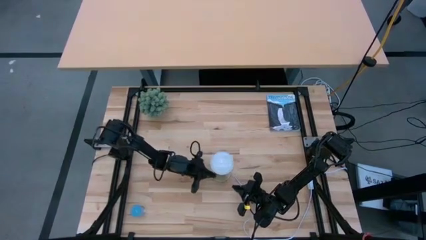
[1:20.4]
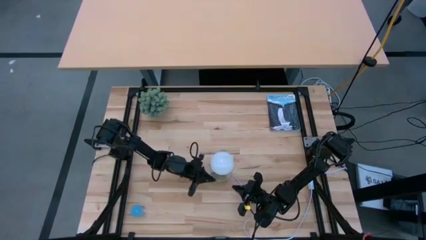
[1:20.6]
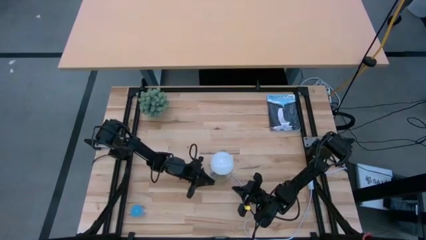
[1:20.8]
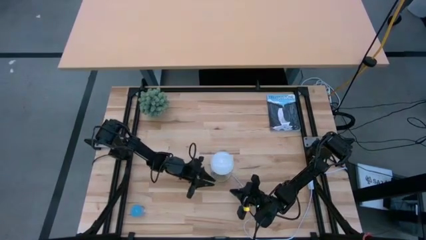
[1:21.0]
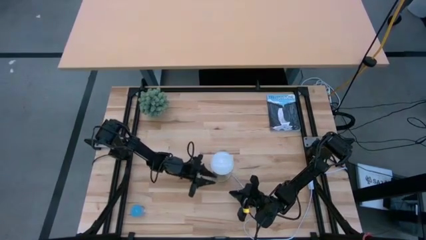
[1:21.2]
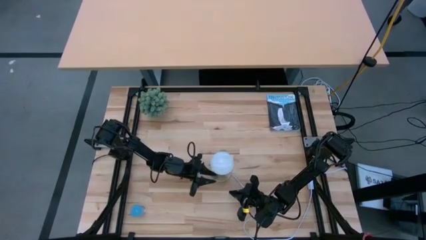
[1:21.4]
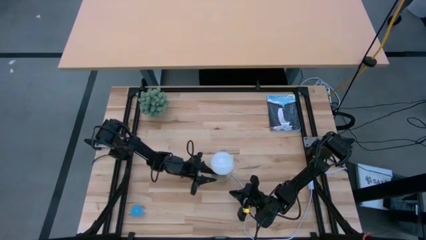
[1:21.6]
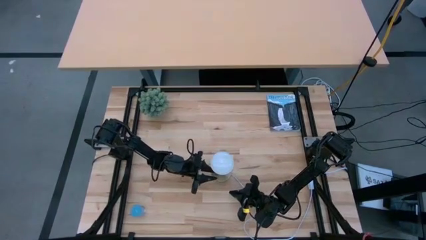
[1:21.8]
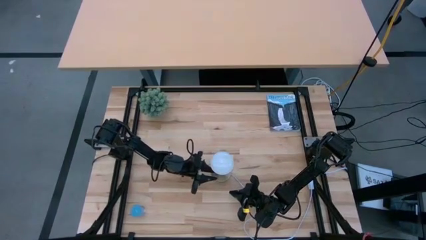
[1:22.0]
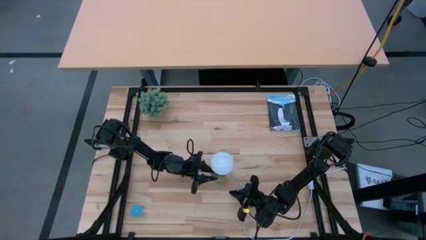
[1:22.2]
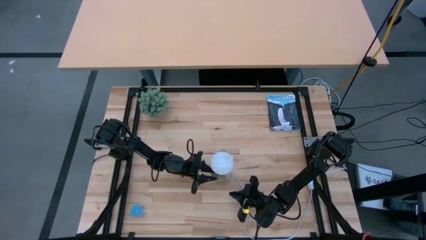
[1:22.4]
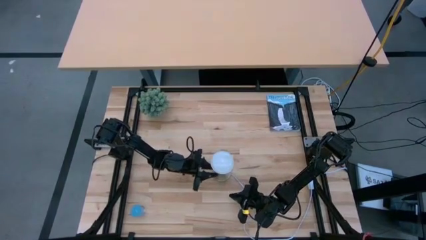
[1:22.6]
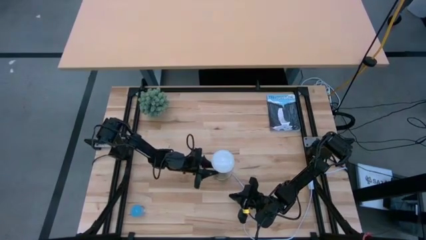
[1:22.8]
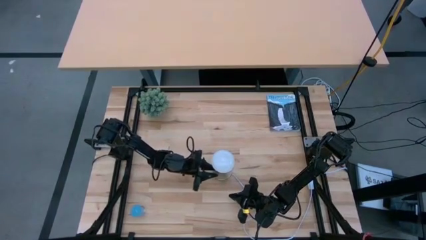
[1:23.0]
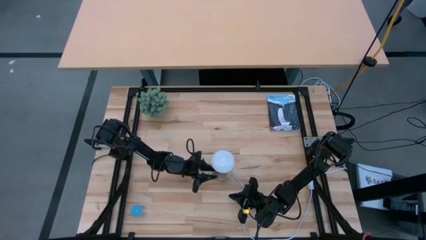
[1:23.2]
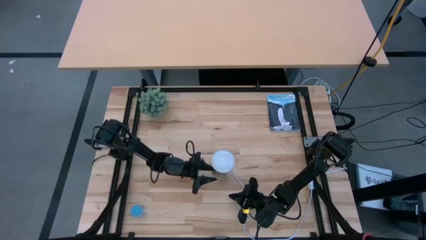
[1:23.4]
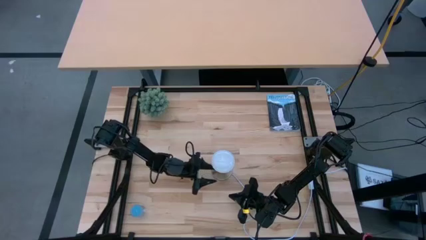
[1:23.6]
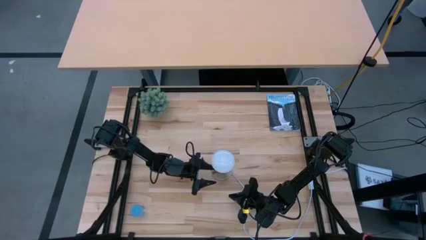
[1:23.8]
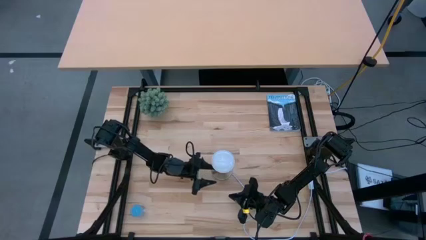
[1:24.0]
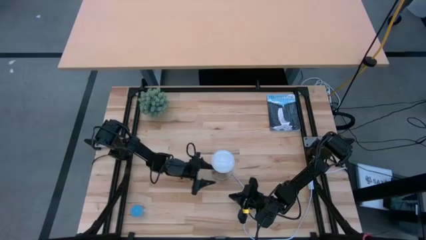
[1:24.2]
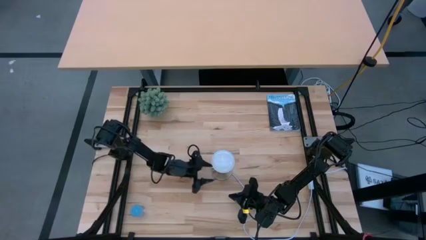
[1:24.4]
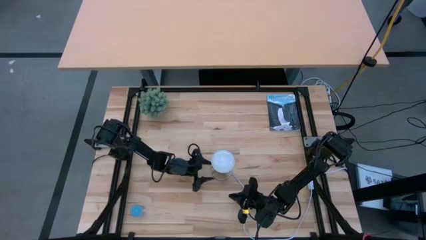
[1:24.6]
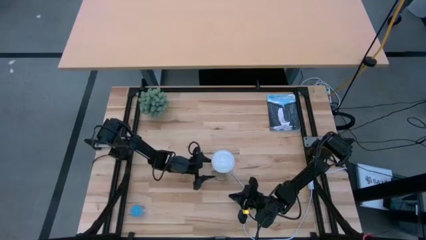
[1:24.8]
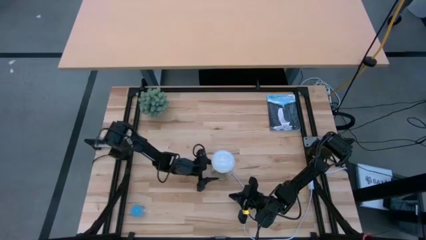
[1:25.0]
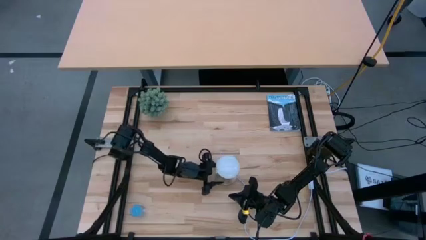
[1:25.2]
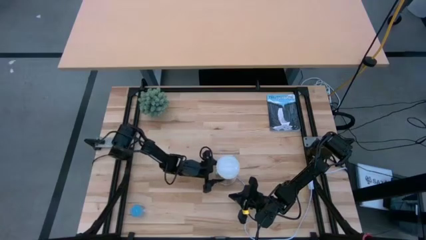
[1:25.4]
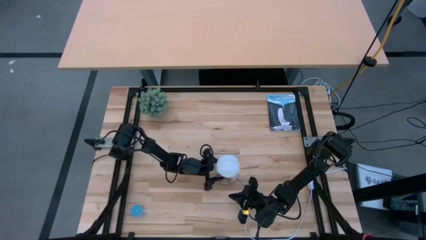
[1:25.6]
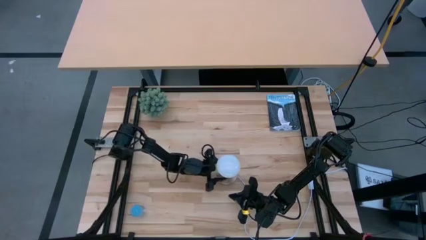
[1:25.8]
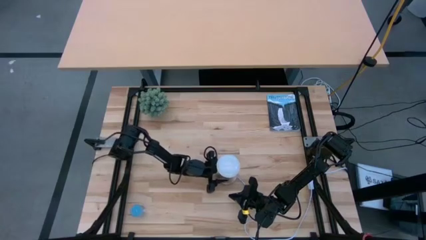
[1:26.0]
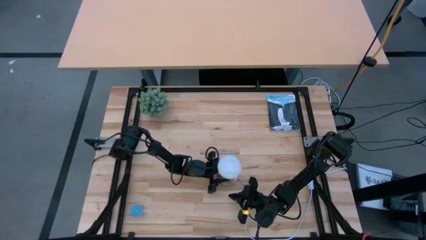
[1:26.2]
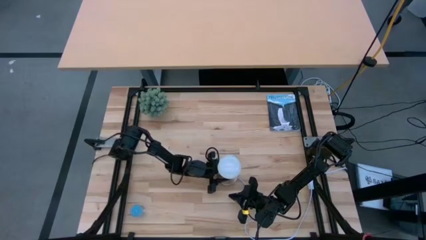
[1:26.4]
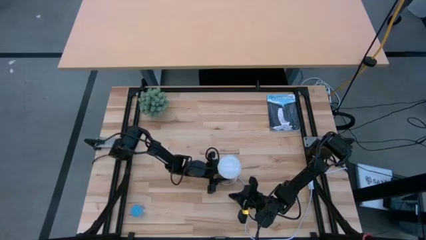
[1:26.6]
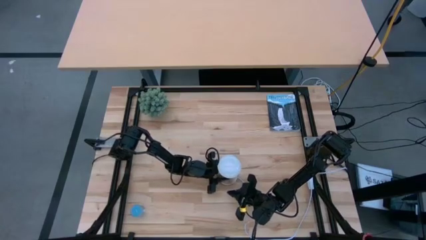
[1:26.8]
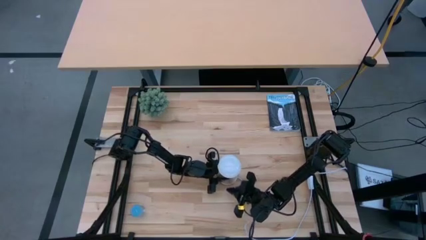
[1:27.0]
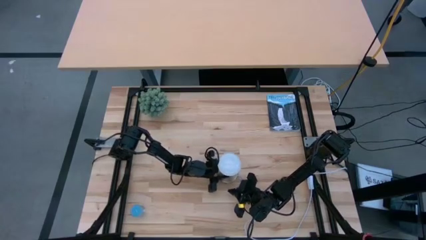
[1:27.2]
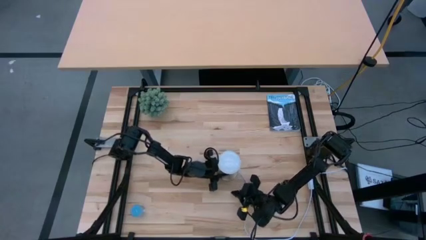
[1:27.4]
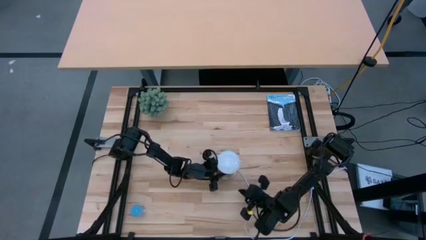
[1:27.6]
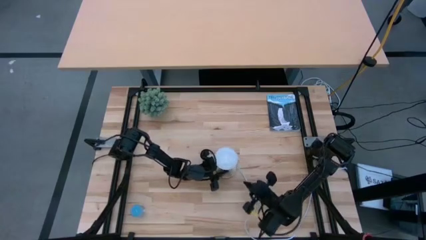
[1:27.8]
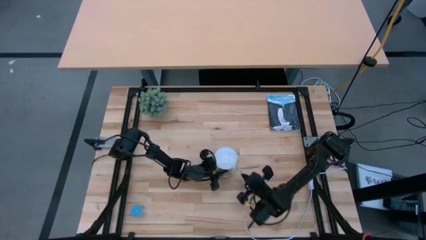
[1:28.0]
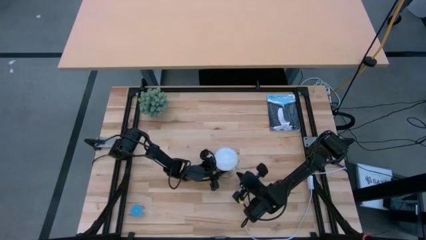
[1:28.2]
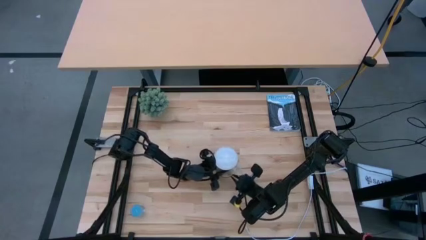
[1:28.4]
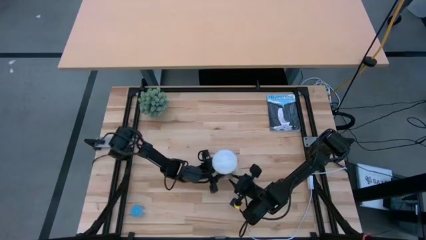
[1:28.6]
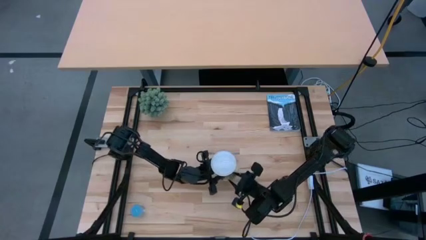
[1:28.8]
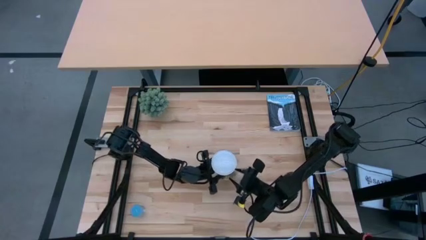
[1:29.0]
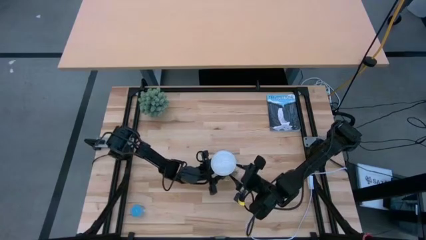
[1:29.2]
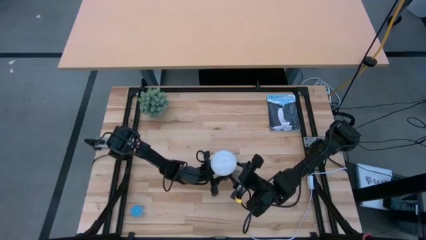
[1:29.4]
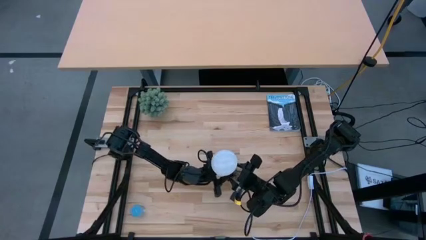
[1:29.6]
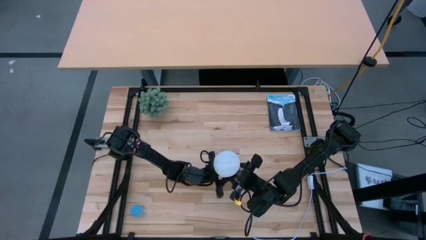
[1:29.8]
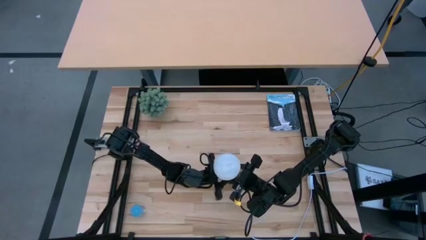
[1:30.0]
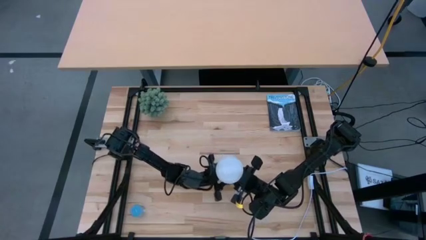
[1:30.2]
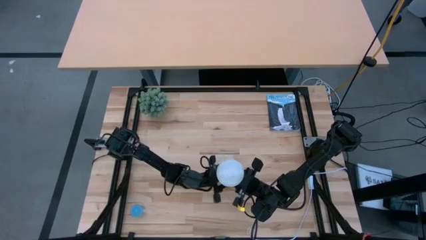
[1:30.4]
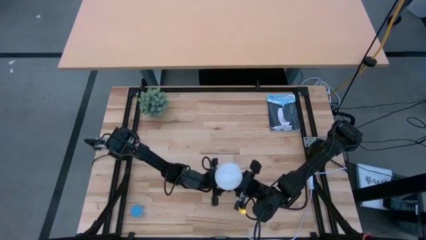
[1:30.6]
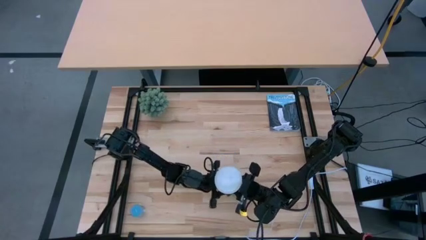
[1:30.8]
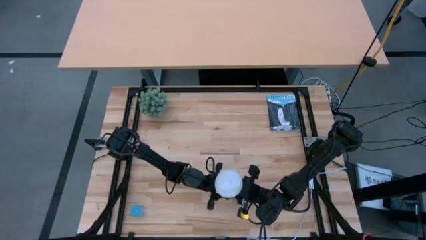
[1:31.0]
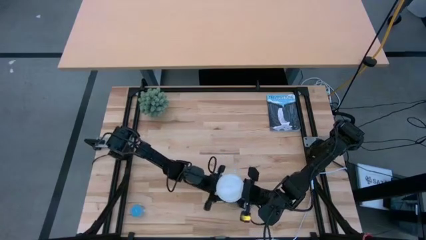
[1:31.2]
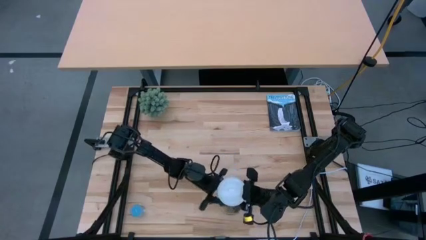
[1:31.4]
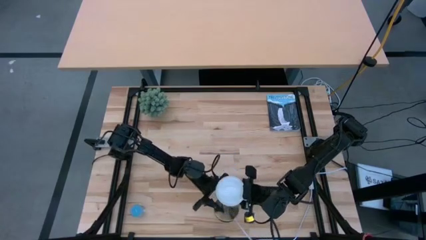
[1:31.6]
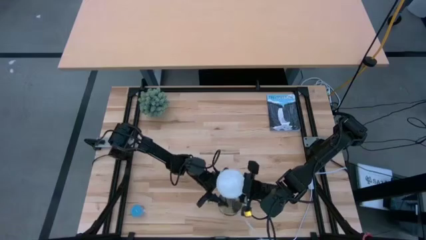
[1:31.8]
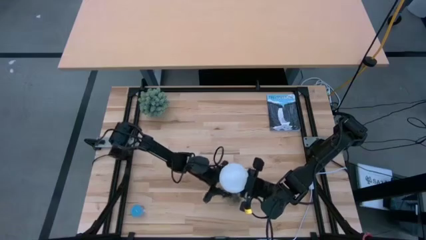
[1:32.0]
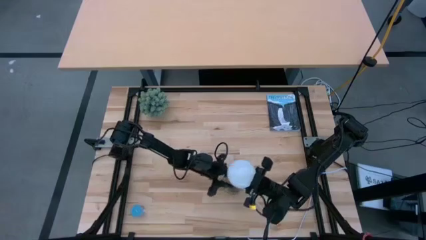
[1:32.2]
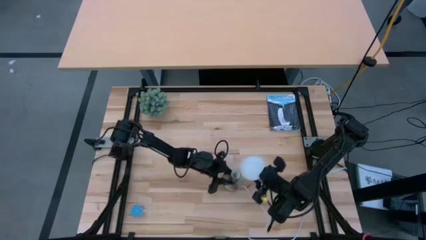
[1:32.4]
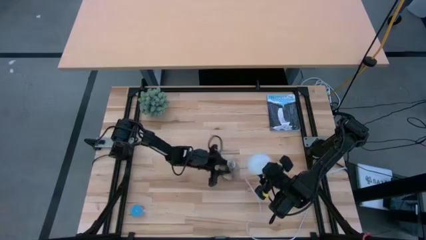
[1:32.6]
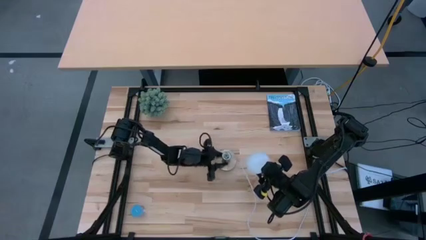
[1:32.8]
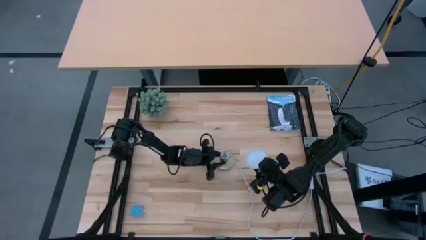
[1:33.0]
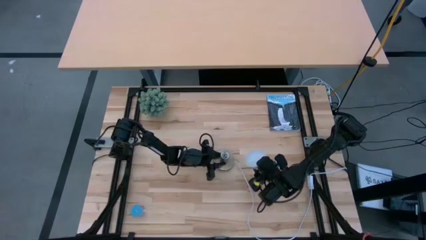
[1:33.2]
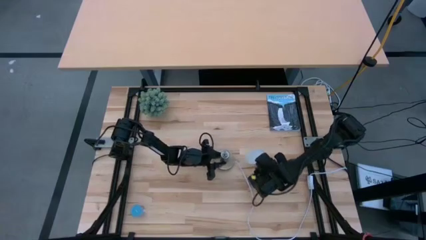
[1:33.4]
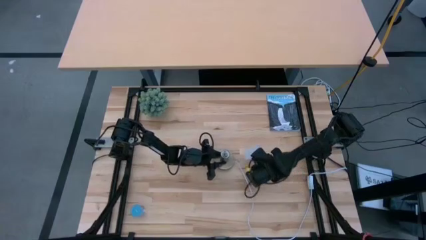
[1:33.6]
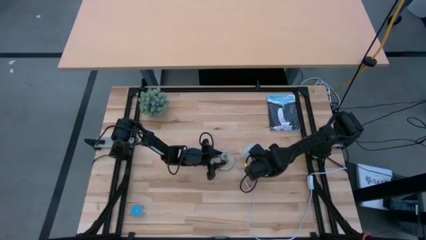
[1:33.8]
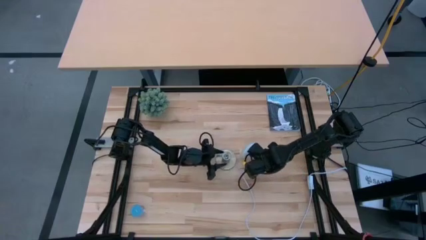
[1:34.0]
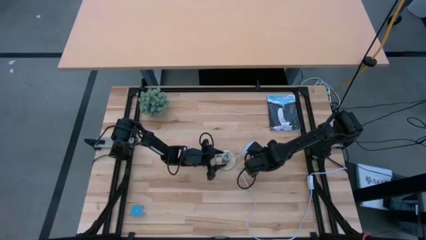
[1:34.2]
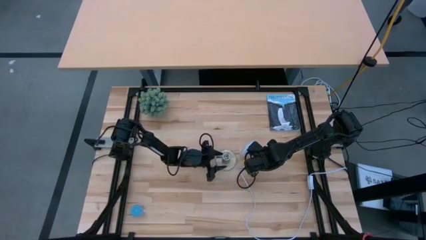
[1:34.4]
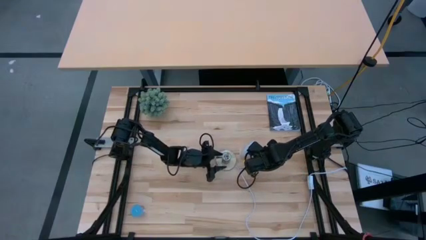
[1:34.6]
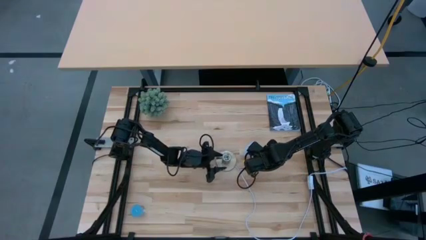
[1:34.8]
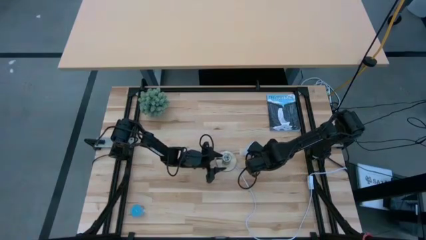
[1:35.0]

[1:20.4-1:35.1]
Task: Screw lightbulb
Remove the lightbulb from the lamp

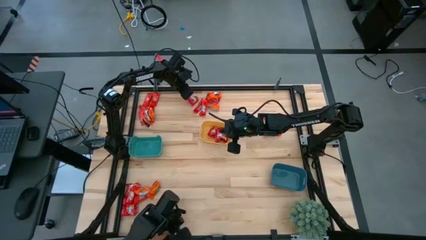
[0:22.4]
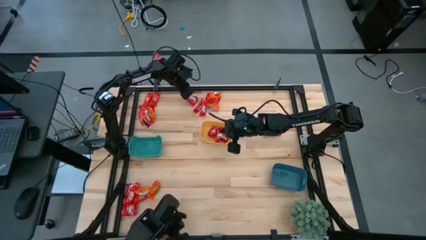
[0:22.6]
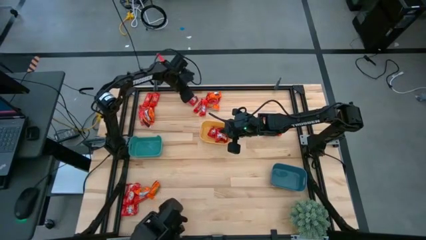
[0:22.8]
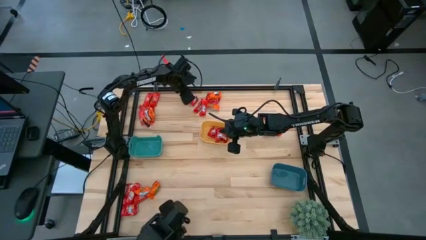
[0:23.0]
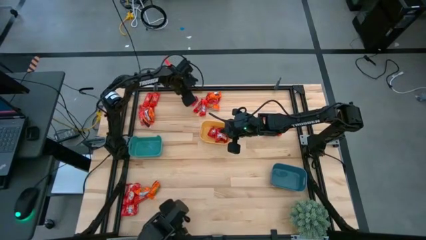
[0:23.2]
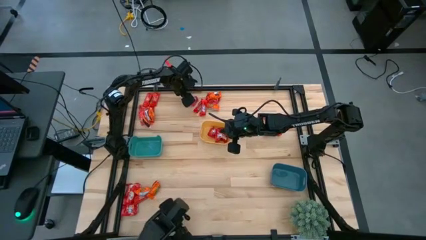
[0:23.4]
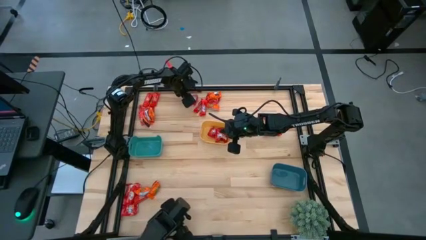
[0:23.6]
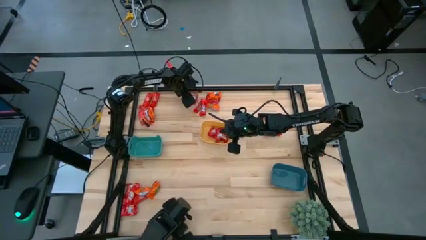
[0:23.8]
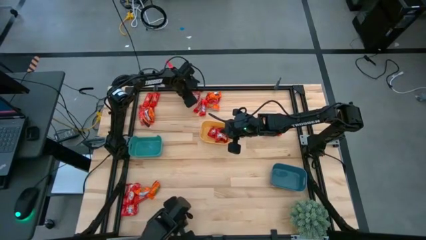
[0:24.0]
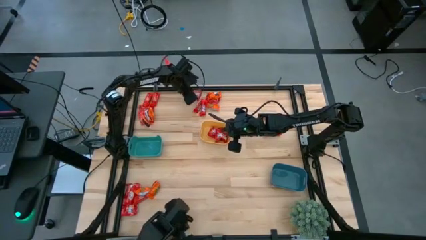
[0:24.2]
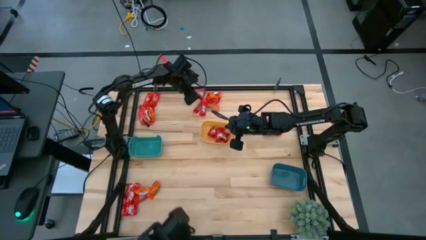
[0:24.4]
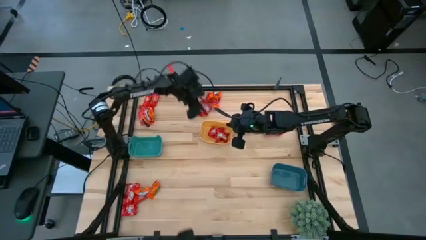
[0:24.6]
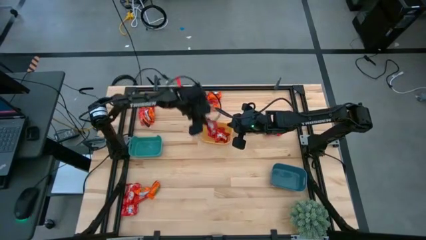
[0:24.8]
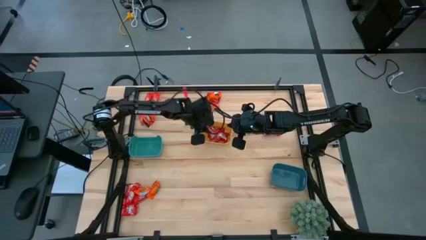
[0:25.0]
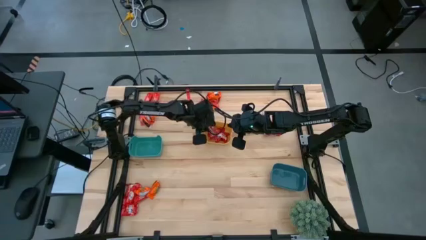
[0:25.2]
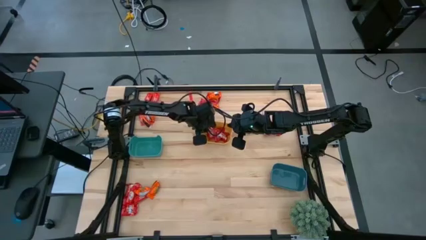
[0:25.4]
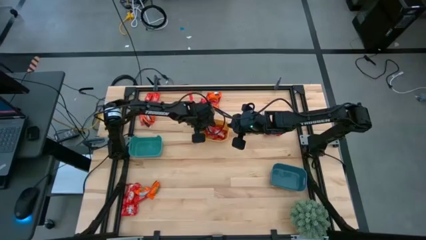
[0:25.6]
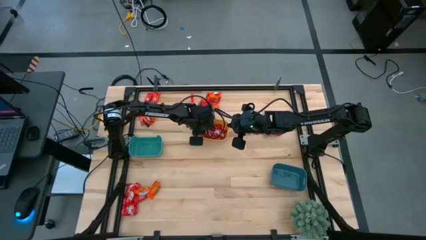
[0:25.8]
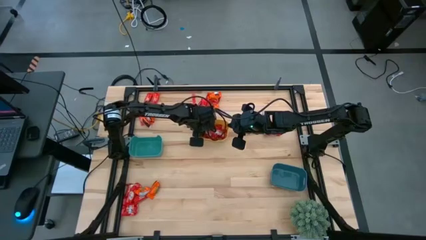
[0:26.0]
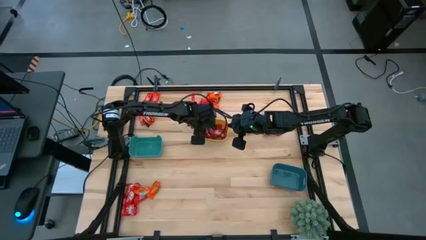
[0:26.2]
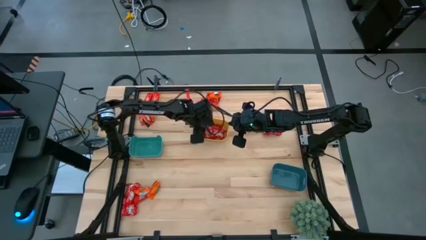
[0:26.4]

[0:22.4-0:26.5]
Task: Sort candy
Put the red candy into the yellow bin
